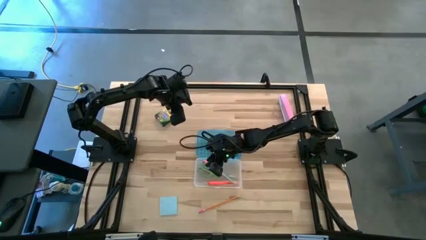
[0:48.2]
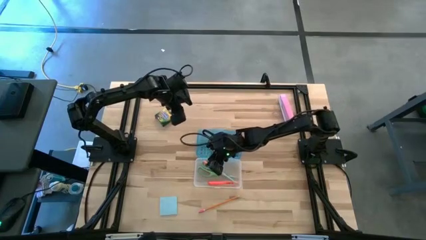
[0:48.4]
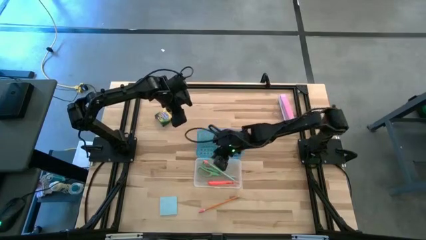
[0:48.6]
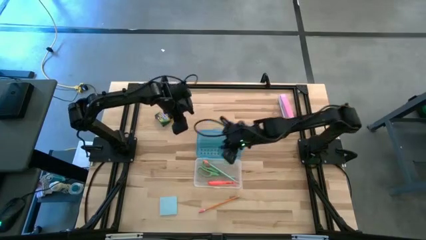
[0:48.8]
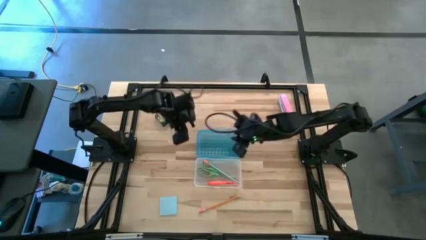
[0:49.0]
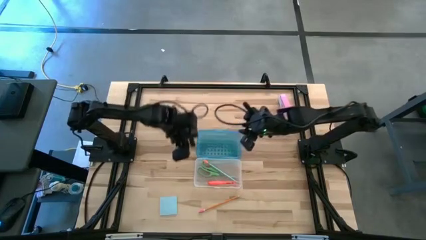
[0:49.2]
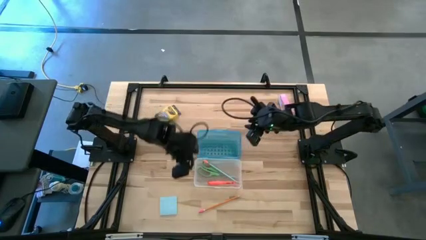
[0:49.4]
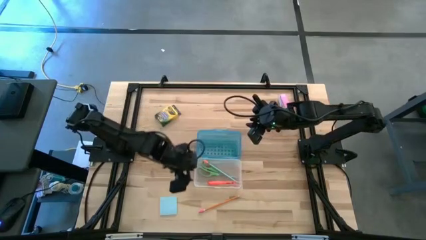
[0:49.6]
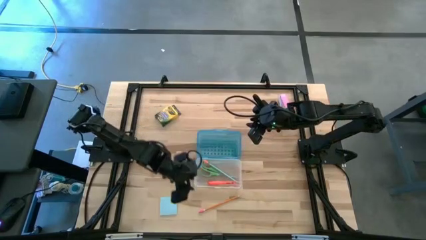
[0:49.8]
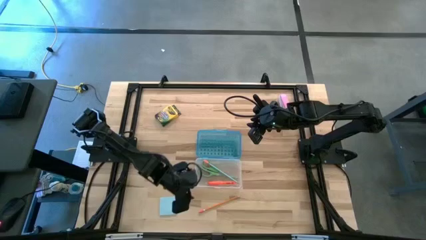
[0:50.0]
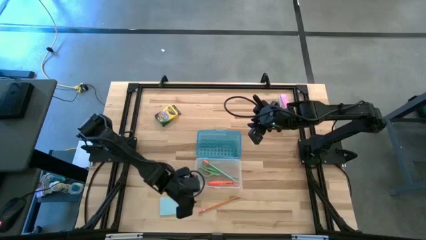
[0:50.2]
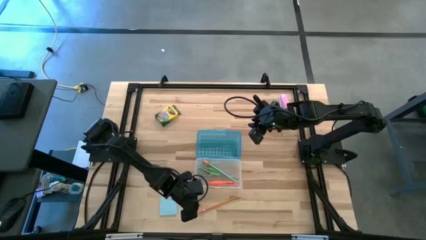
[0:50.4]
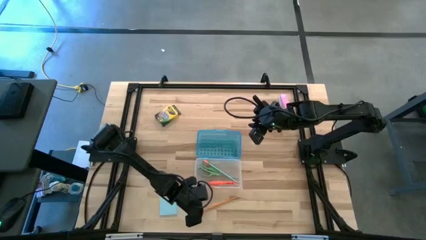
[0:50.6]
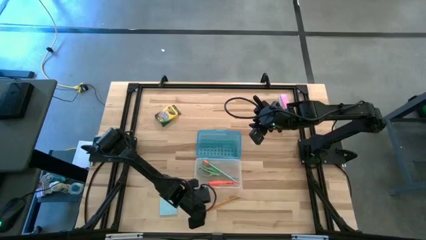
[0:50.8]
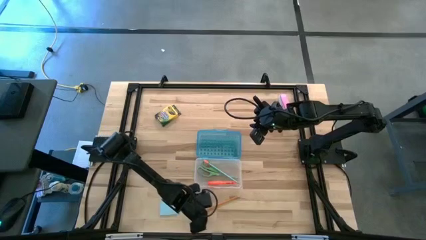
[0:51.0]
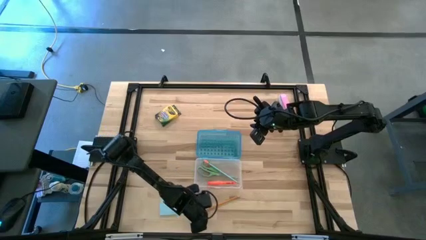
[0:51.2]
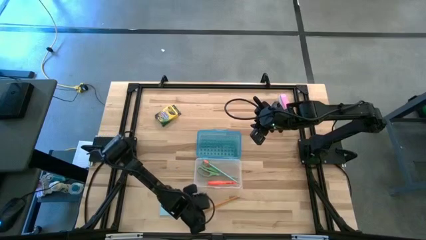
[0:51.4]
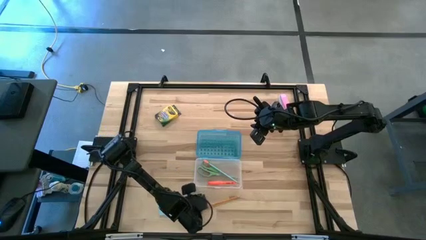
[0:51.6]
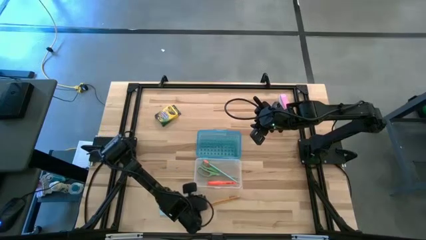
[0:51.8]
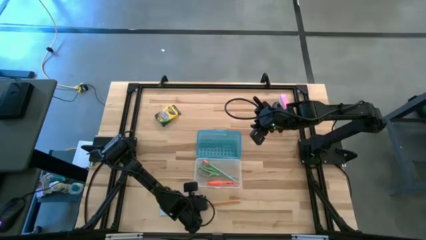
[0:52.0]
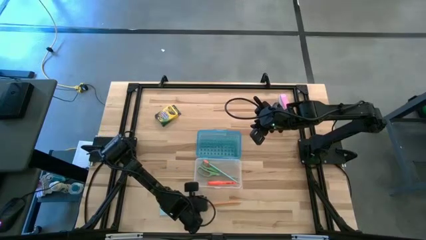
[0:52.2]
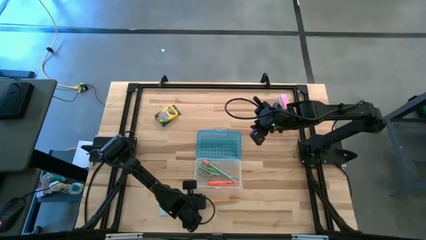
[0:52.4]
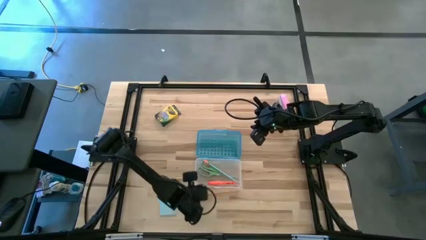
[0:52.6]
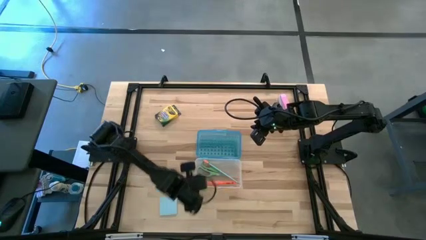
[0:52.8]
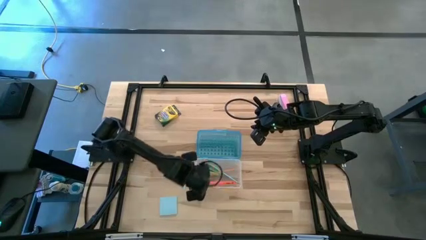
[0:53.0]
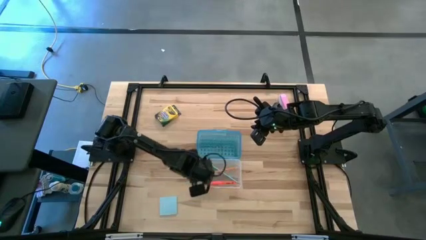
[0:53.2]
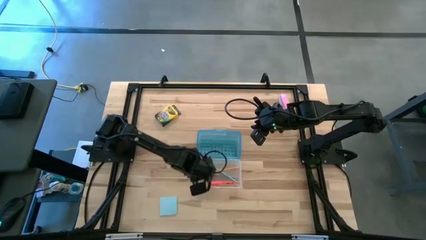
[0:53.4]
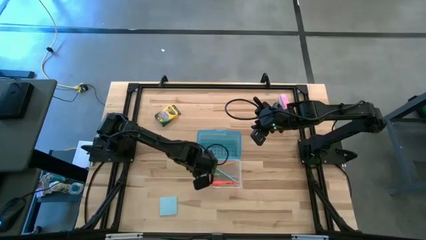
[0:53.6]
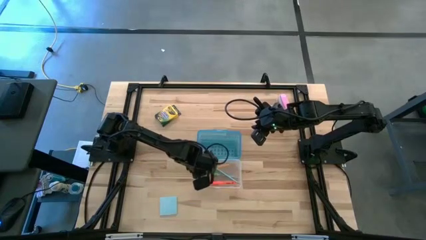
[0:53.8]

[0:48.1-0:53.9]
Task: Pack school essentials
Put the yellow pencil into the blue supply box

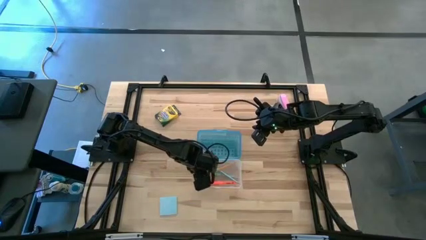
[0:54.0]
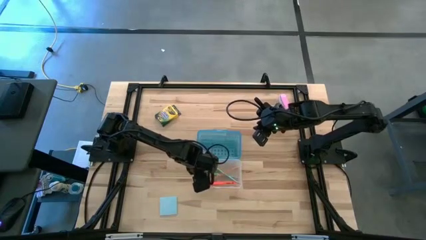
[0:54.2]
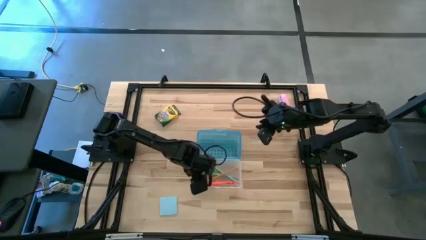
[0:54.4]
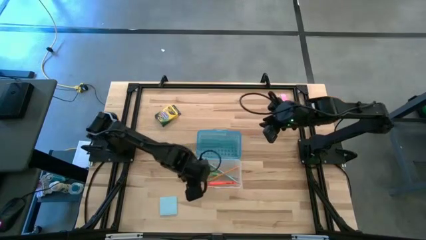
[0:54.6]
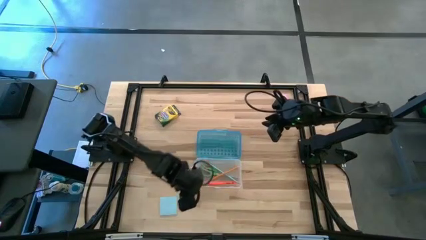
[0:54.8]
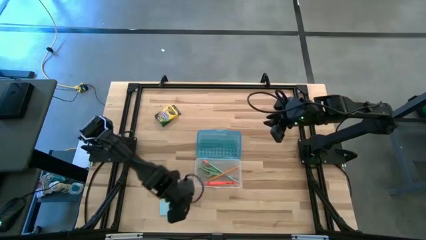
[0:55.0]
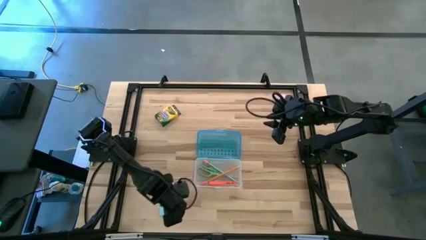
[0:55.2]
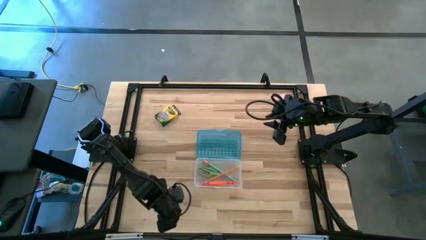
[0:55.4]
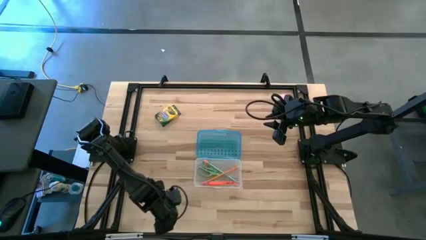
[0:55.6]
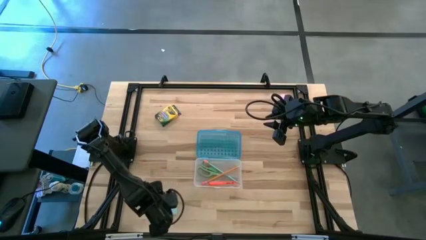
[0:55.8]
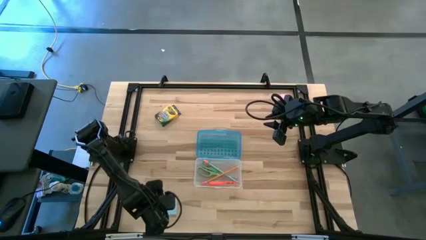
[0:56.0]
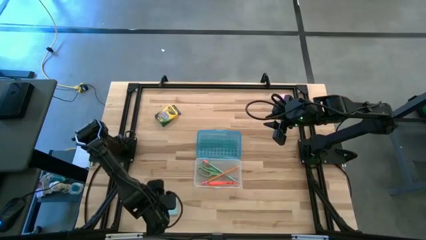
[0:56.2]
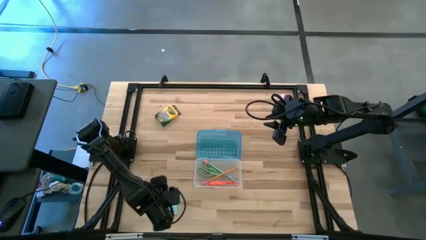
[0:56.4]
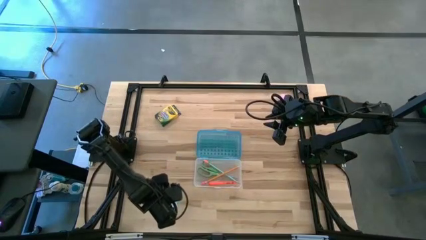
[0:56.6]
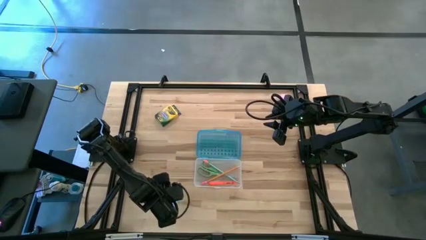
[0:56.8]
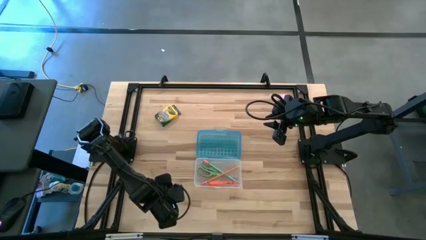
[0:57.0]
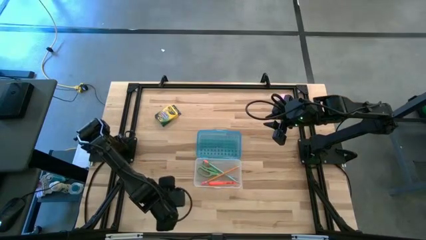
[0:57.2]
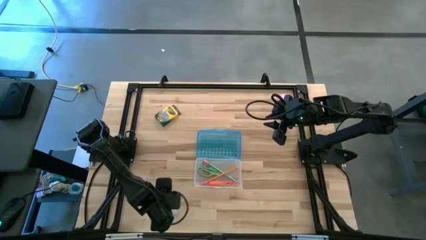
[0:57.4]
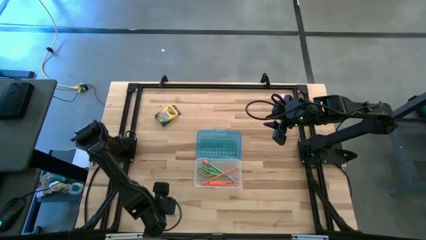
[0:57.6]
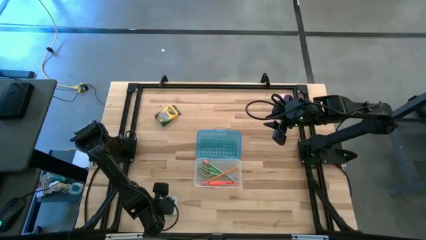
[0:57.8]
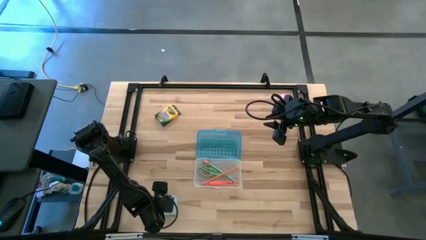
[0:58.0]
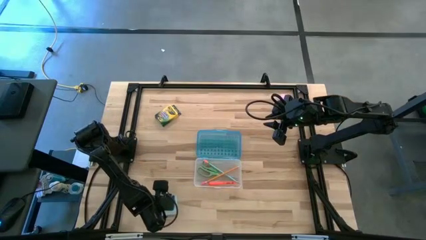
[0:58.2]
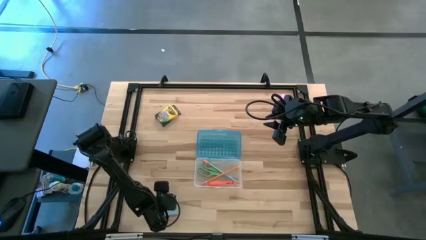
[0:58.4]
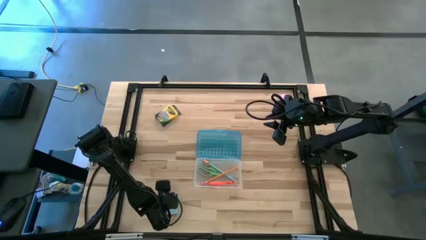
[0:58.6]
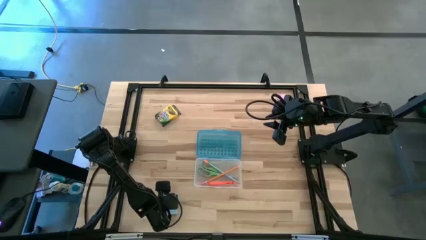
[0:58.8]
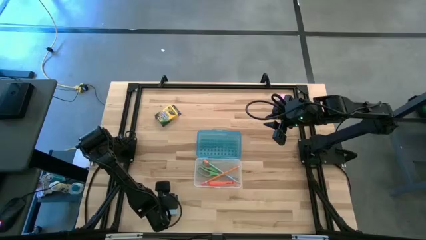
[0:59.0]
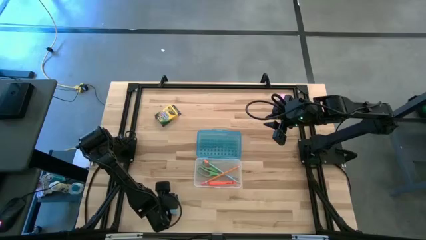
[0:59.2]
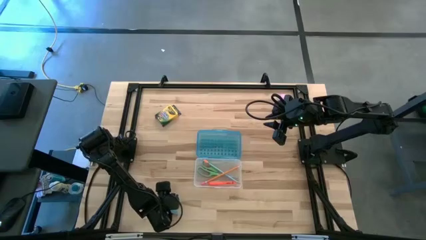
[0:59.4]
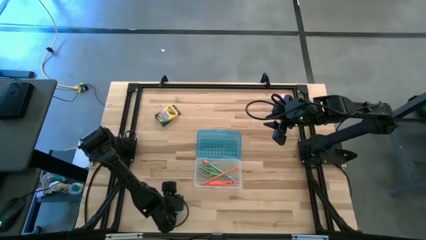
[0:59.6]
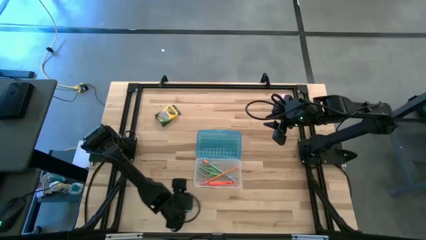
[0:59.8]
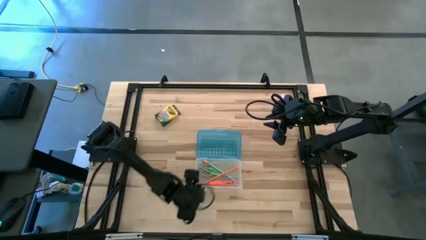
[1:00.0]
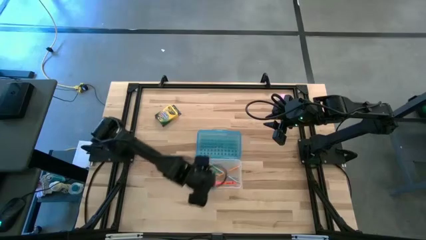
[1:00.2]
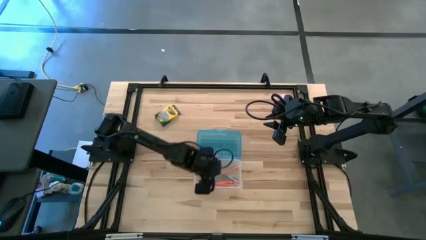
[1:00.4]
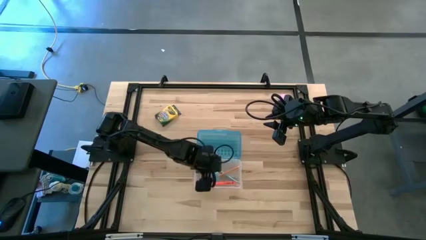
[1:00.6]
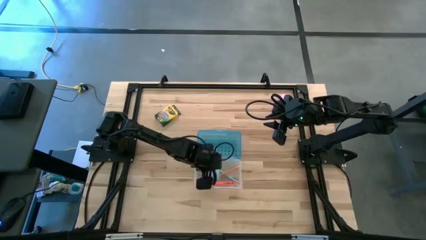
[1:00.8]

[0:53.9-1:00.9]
Put the blue sticky notes into the blue supply box

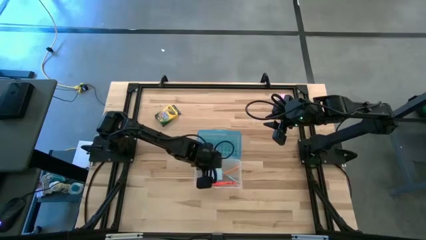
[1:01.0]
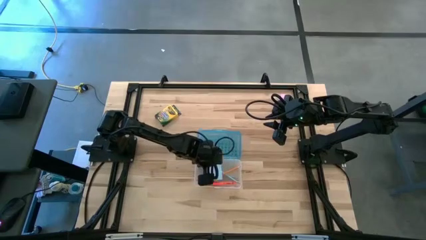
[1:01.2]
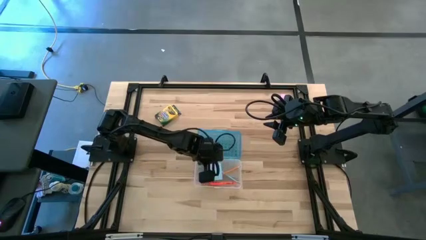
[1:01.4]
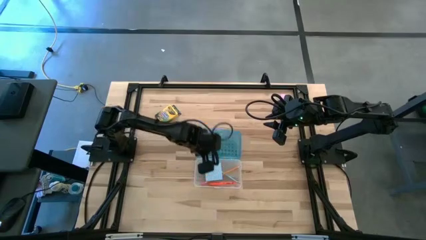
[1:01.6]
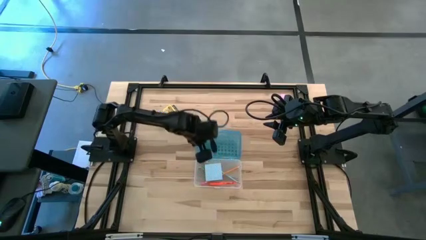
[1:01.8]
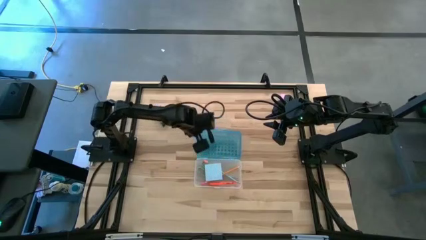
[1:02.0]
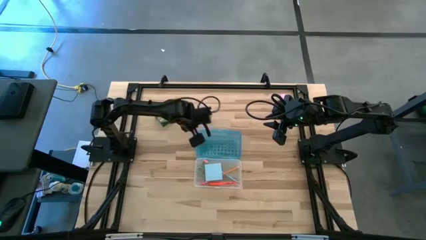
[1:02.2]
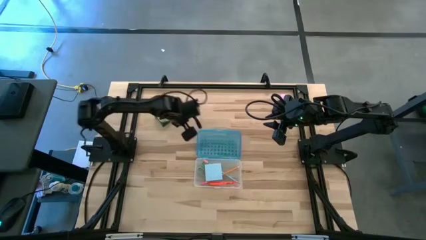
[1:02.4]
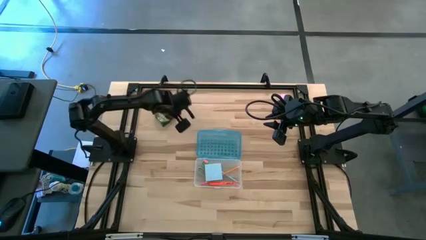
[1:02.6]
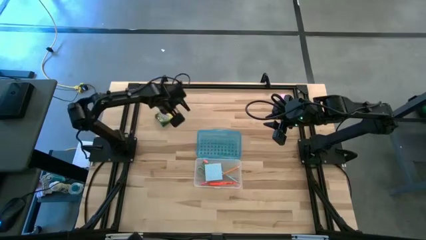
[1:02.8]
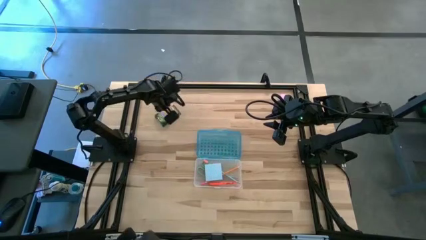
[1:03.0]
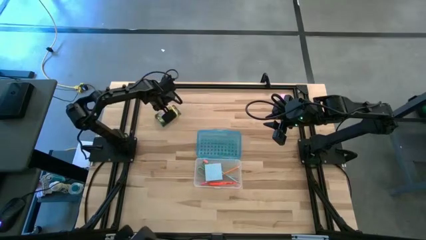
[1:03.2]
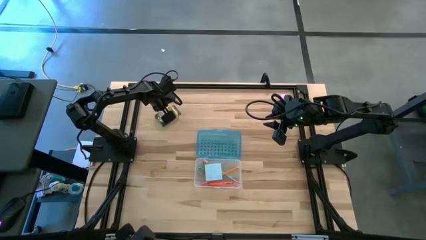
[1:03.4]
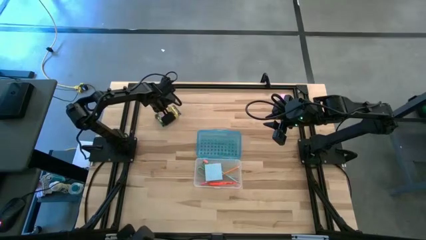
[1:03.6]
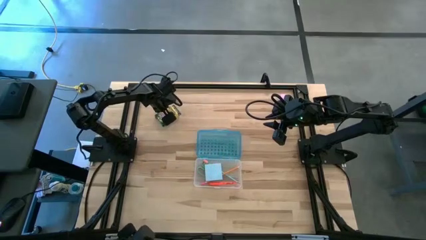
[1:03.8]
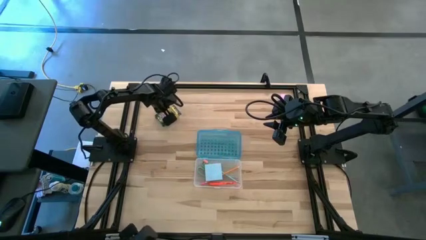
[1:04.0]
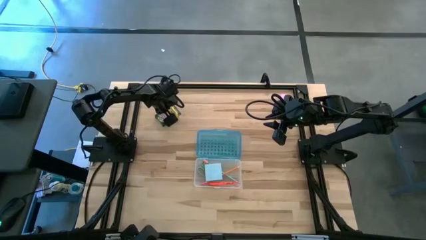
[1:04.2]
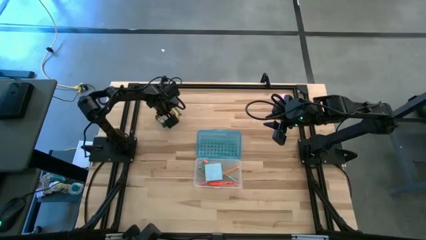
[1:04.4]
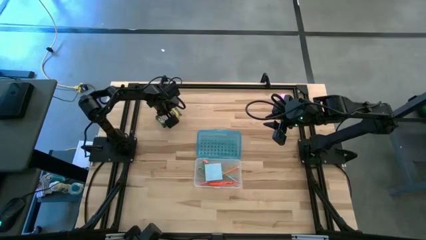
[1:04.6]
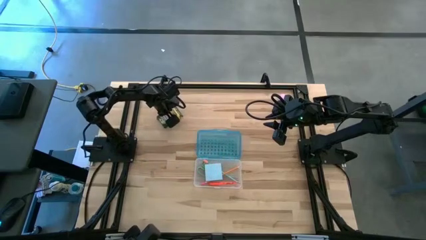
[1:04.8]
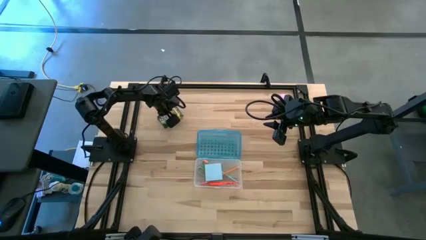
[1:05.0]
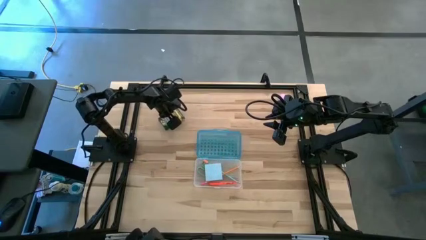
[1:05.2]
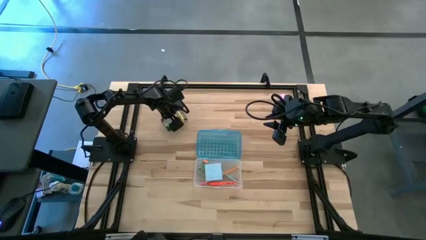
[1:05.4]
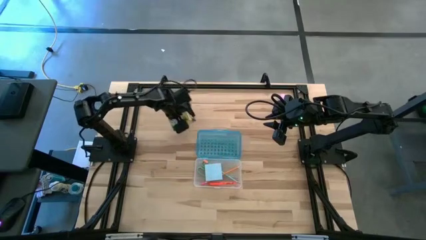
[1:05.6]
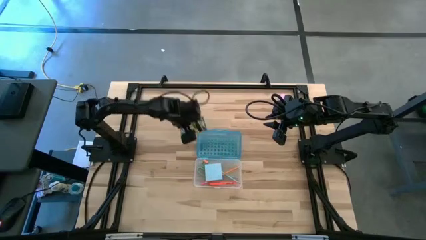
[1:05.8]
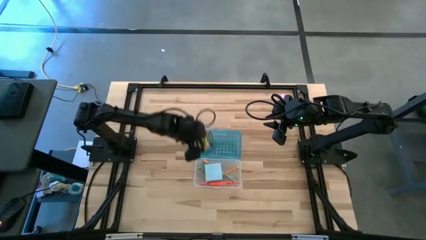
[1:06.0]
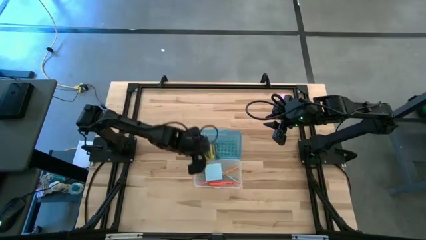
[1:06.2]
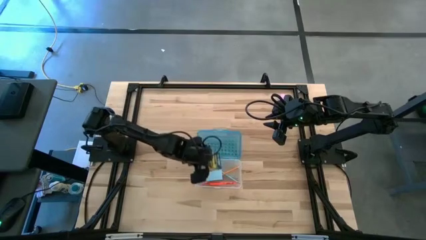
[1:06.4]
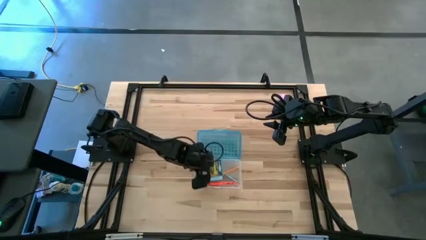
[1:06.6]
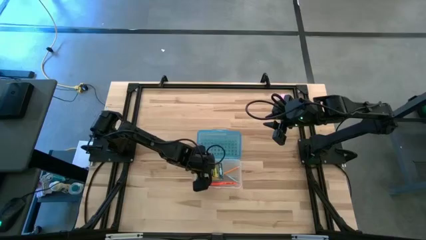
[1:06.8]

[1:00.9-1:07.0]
Put the yellow crayon box into the blue supply box
